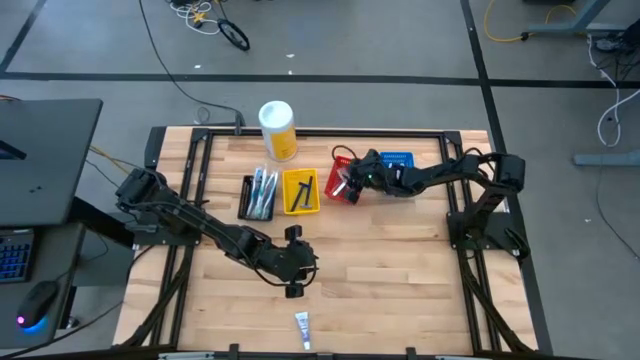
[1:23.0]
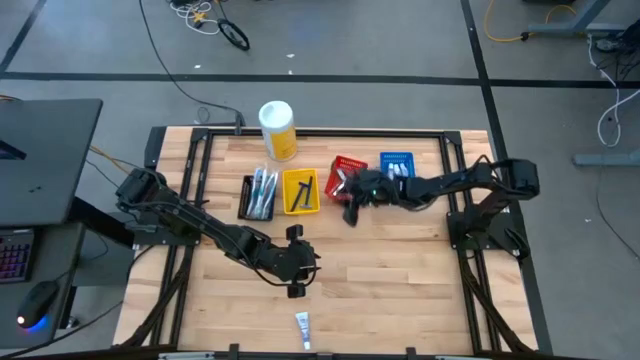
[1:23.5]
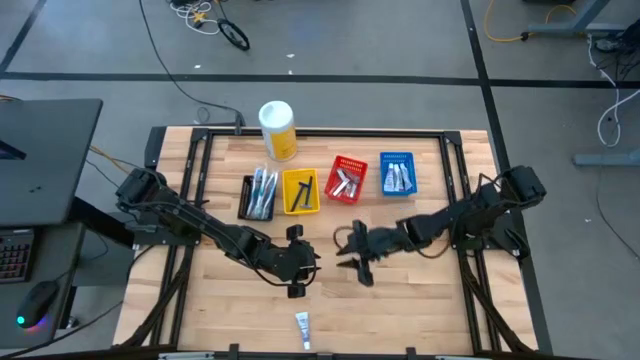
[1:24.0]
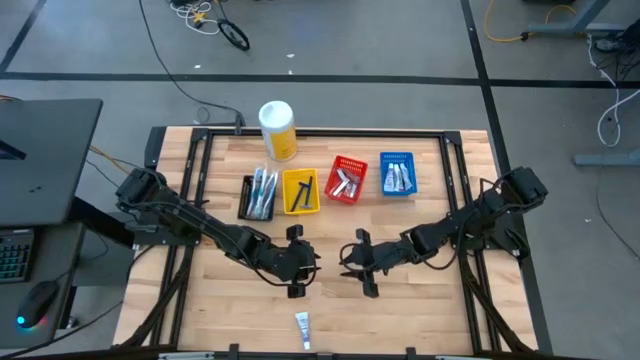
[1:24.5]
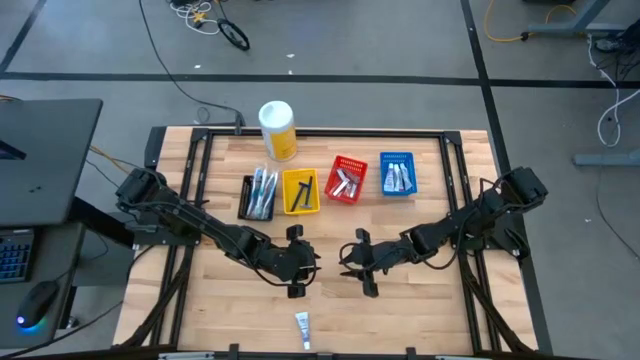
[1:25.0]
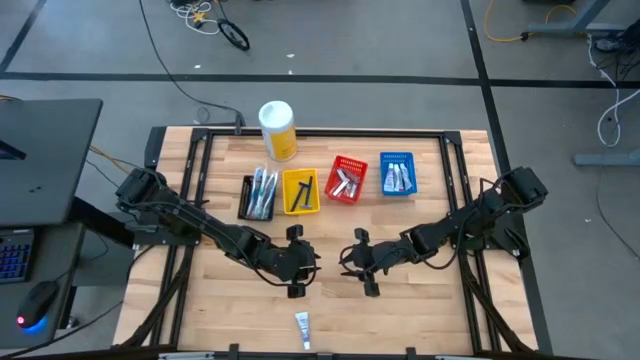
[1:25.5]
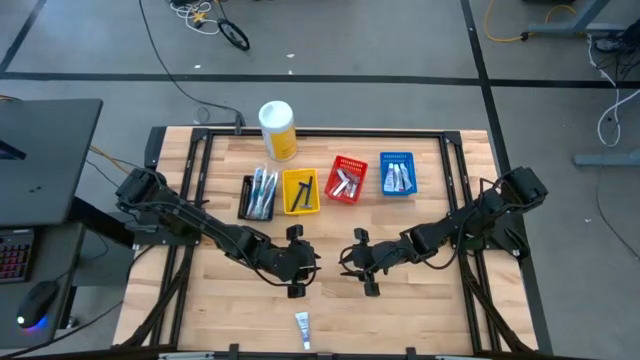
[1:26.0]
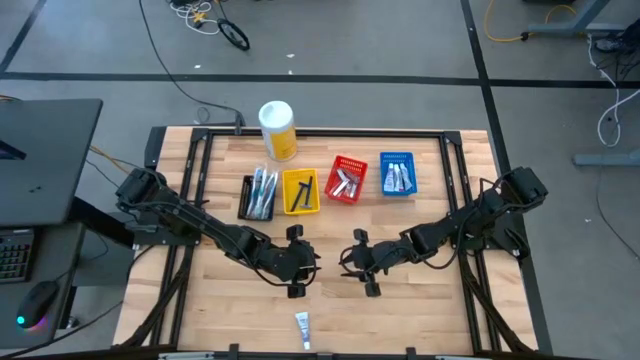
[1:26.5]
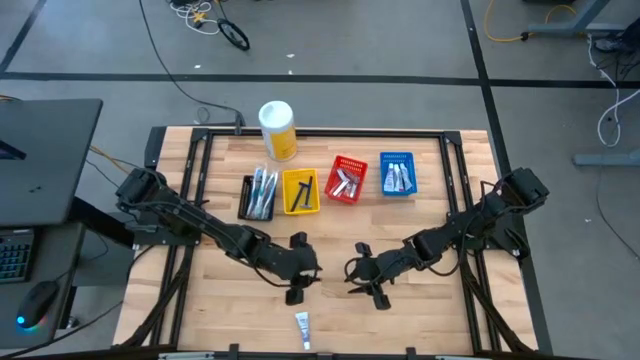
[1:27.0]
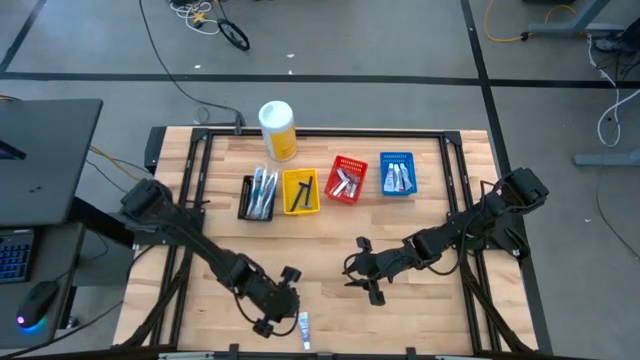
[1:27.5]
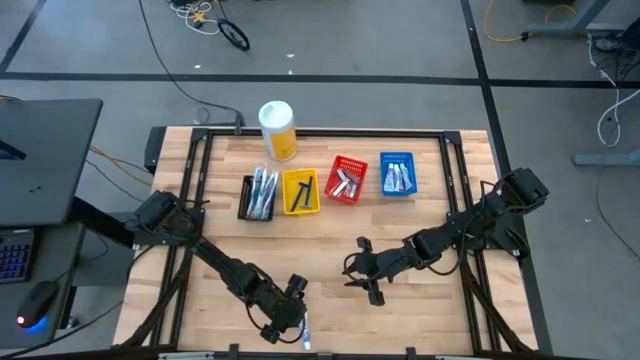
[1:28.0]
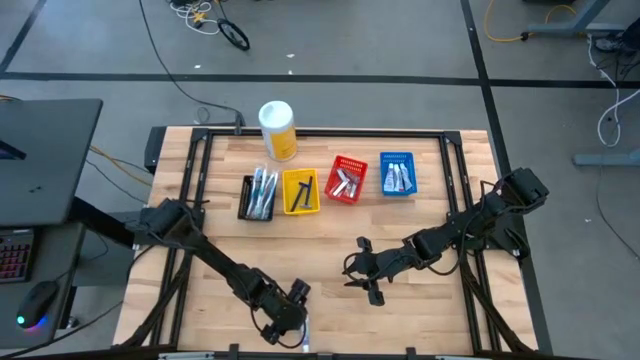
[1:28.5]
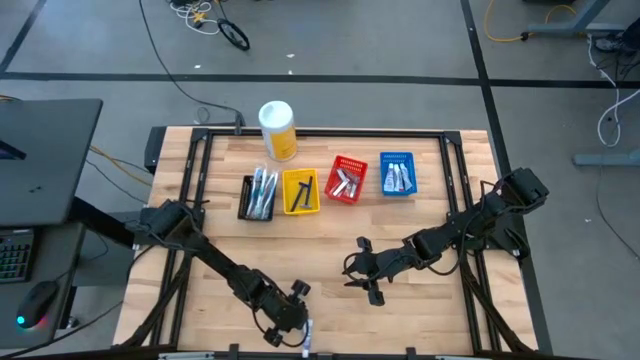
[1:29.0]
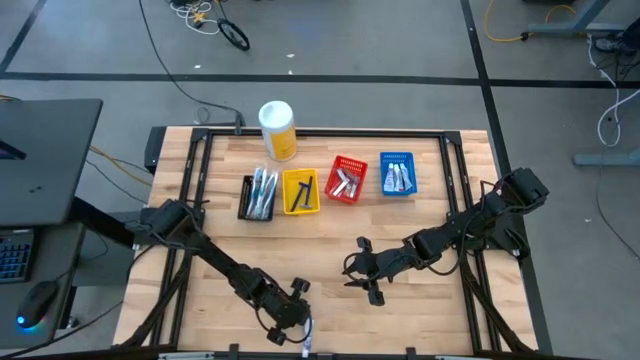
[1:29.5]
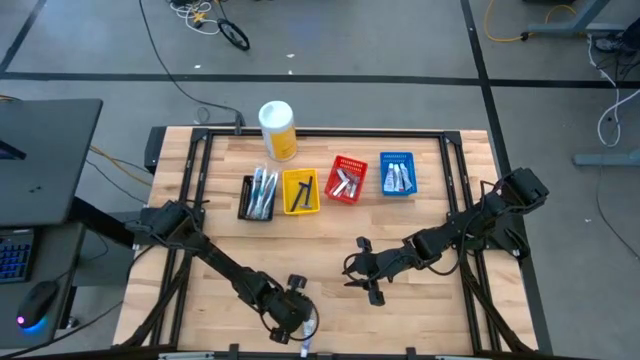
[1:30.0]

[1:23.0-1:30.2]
Task: Pick & Place Travel size toiletries
Put the white toothpaste into the blue bin

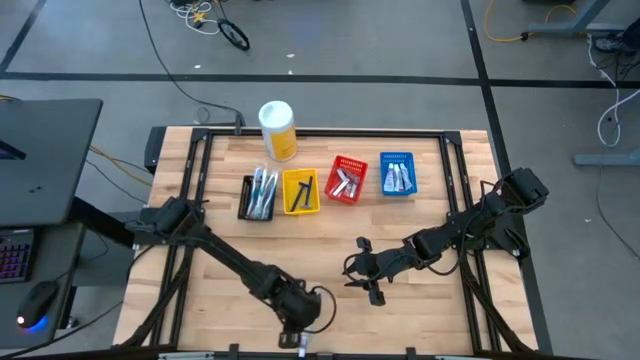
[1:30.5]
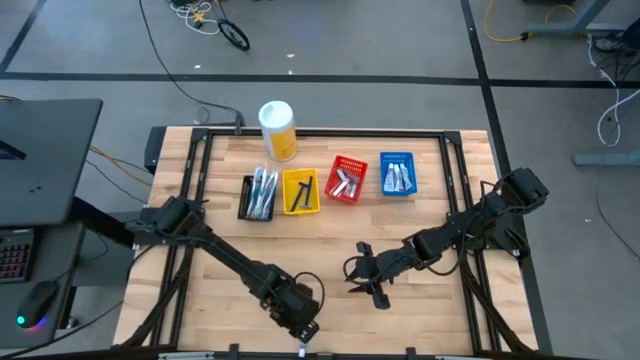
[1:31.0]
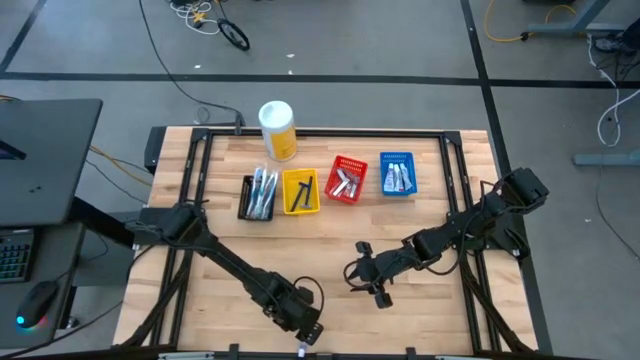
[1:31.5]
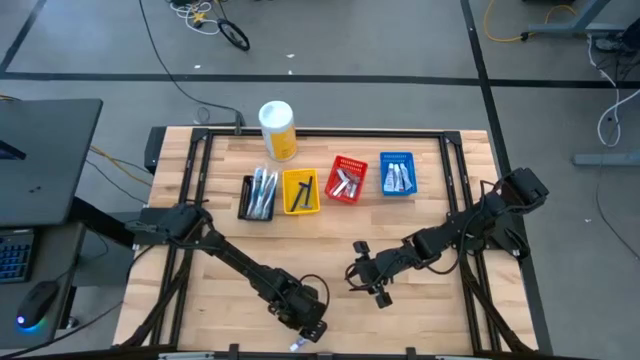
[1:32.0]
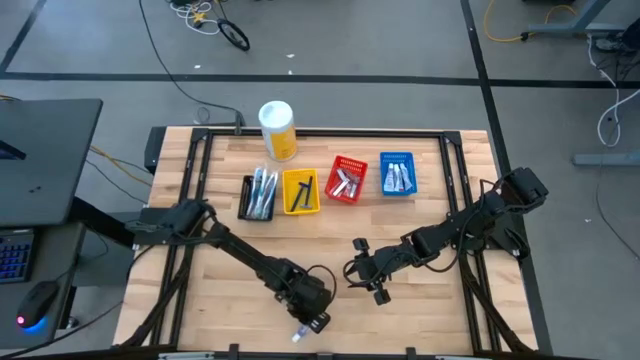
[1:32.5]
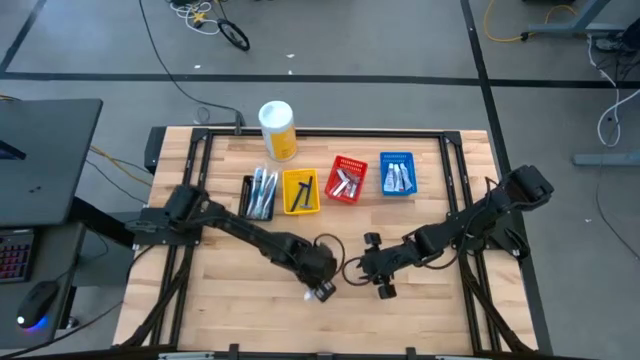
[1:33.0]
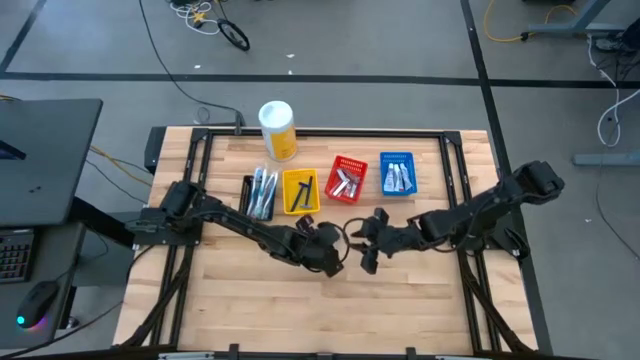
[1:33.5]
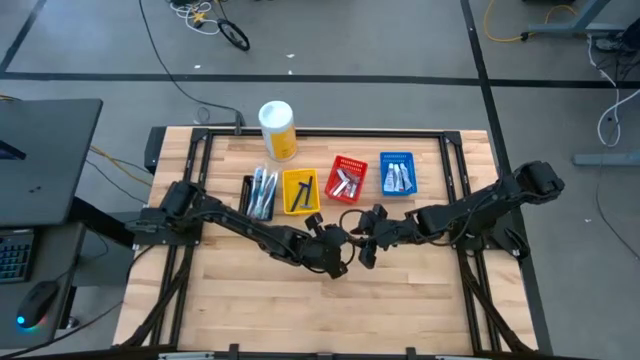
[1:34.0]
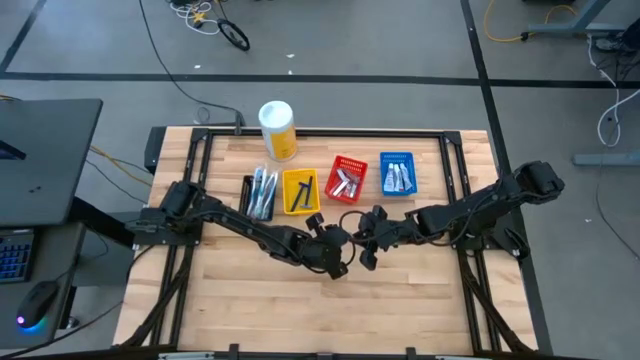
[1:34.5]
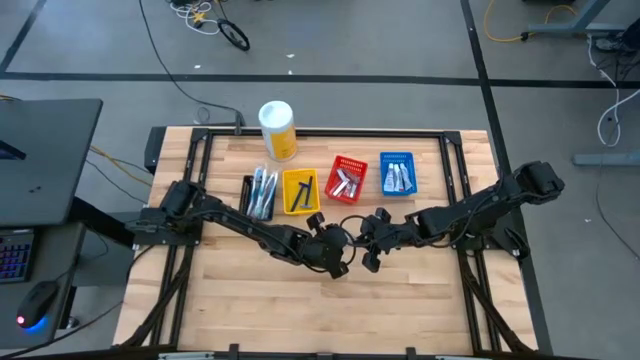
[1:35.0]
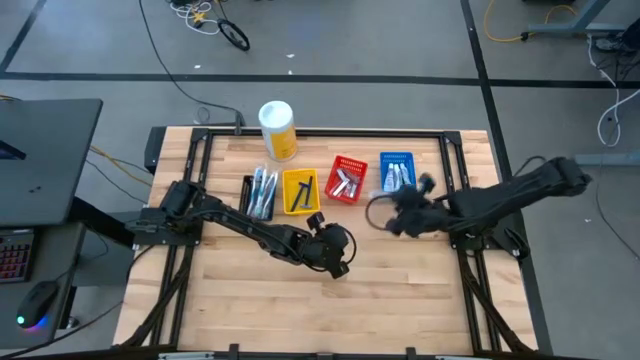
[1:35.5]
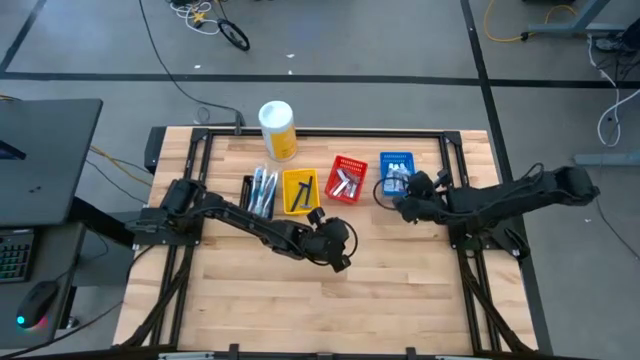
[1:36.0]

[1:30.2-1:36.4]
Put the white toothpaste into the blue bin

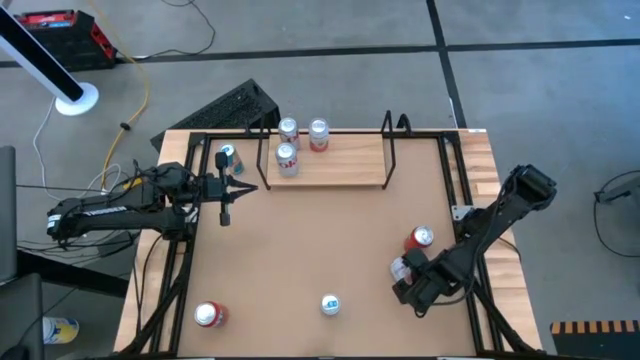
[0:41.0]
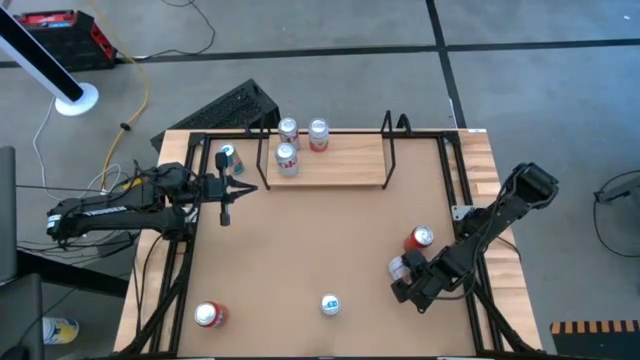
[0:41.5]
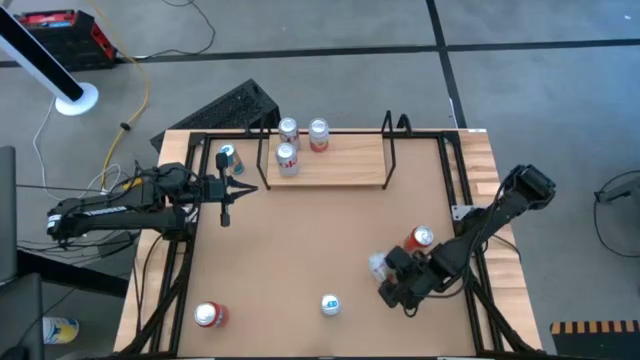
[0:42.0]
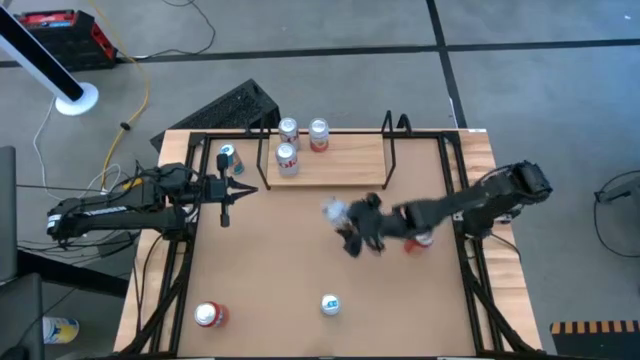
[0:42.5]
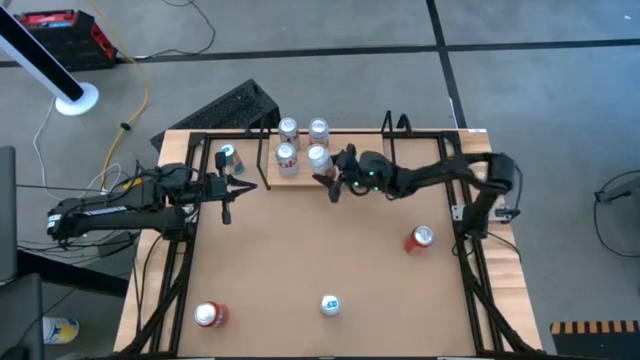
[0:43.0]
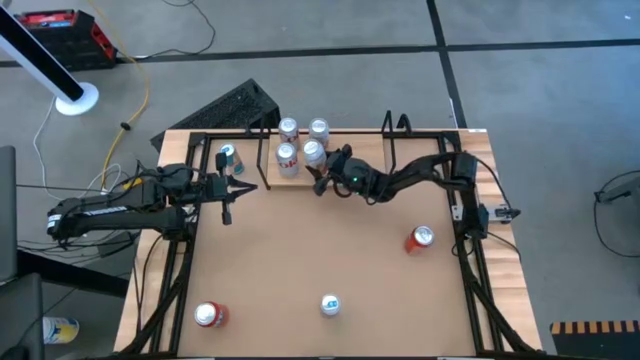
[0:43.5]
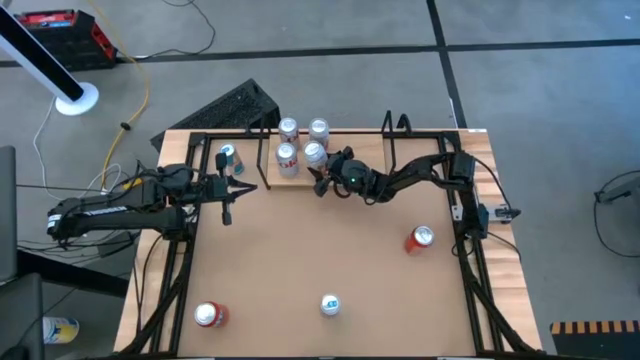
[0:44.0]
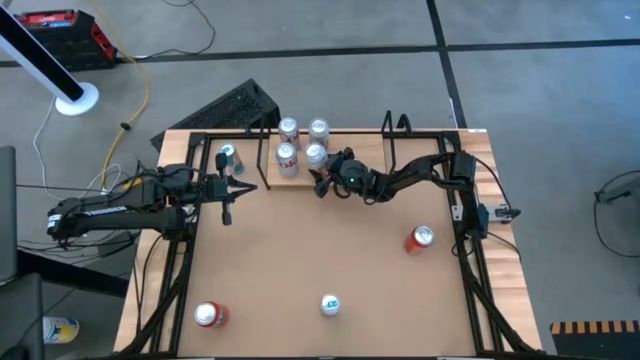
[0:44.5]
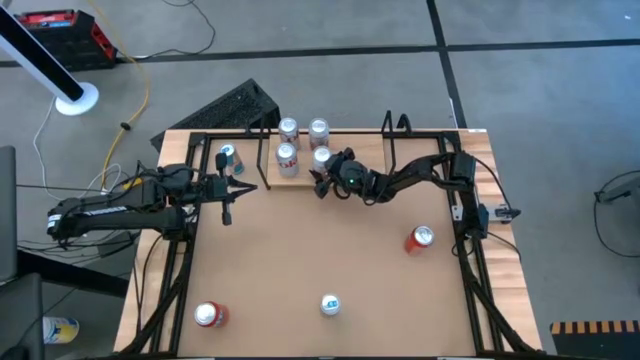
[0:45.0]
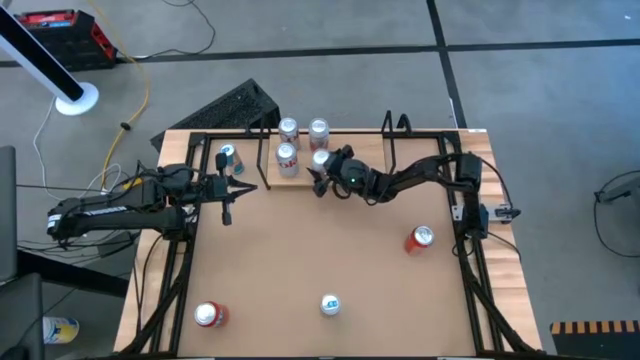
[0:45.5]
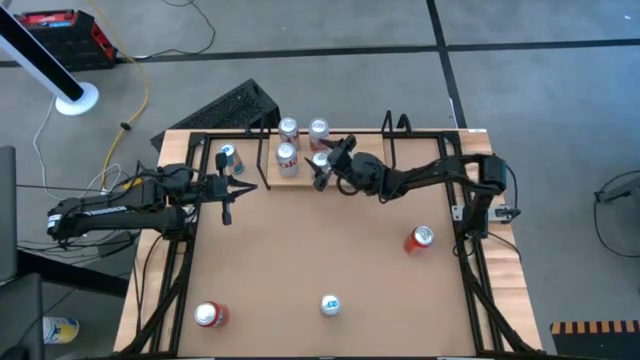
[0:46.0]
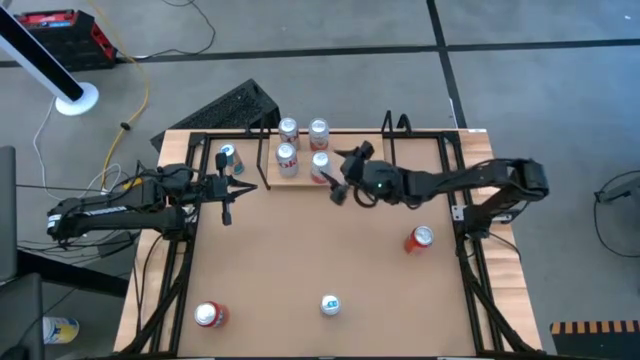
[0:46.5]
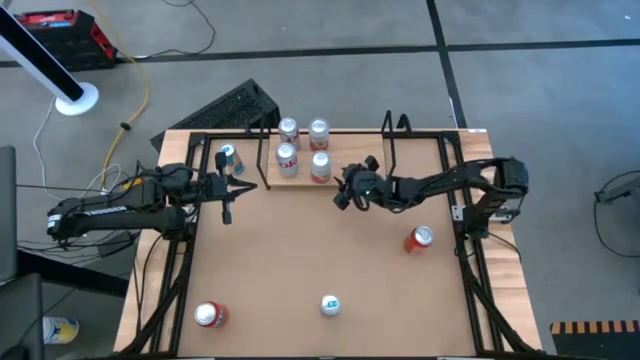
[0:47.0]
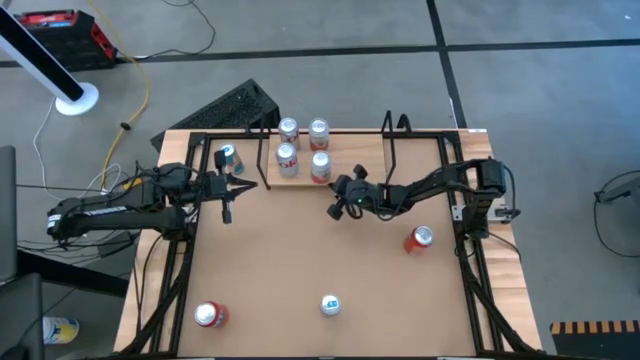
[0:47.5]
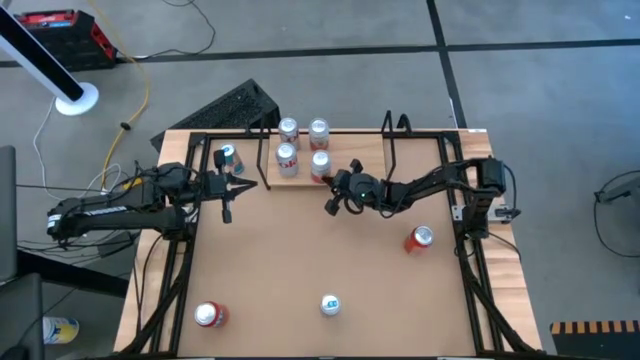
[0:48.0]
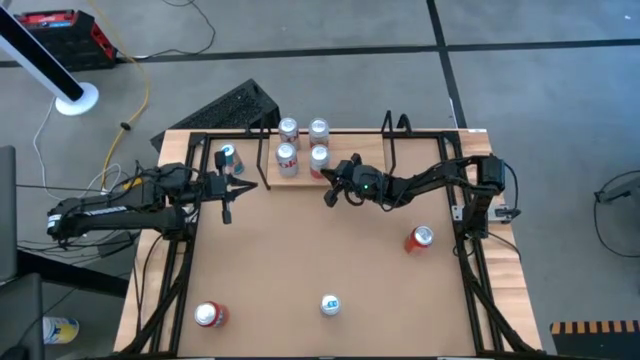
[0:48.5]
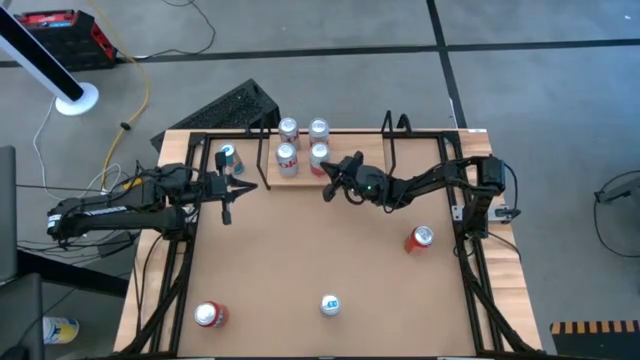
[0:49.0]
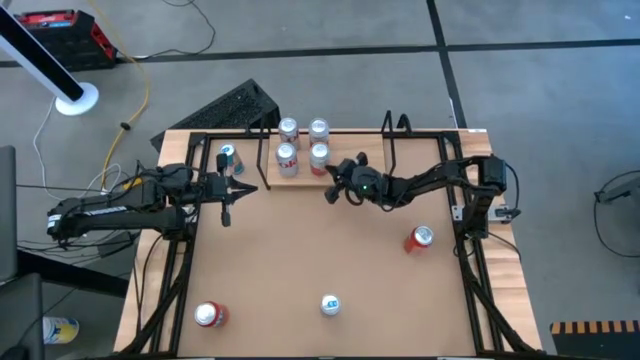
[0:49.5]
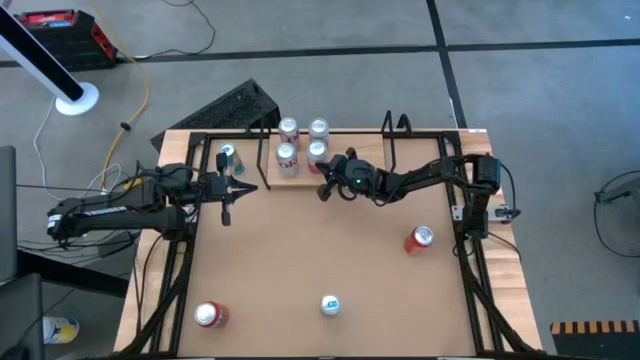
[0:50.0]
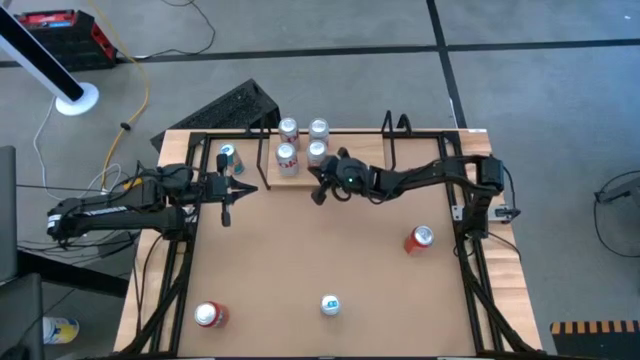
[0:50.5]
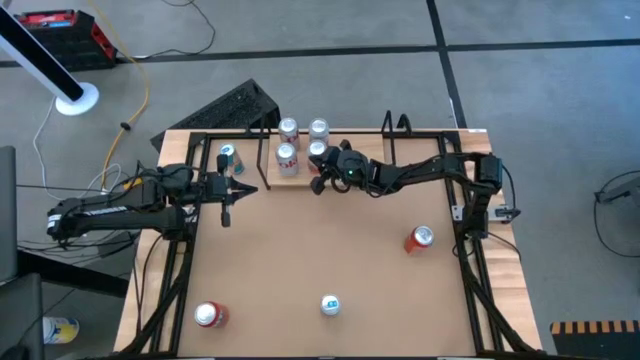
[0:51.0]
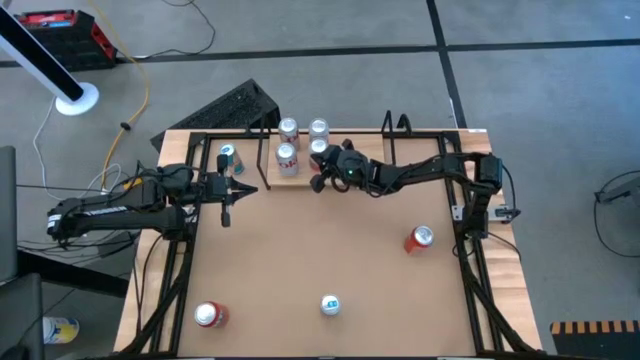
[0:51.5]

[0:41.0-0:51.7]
Task: Place canned beverage on shelf
Put the pink-white soda can on the shelf aligned with the other pink-white soda can
